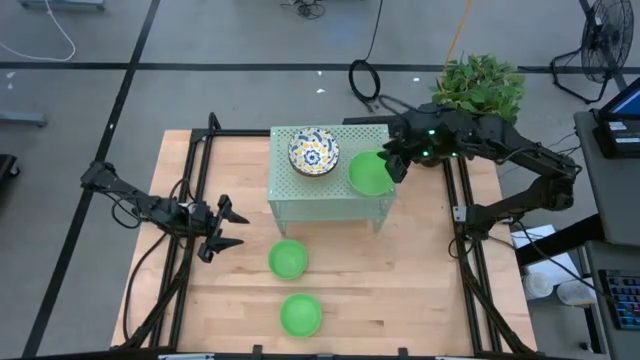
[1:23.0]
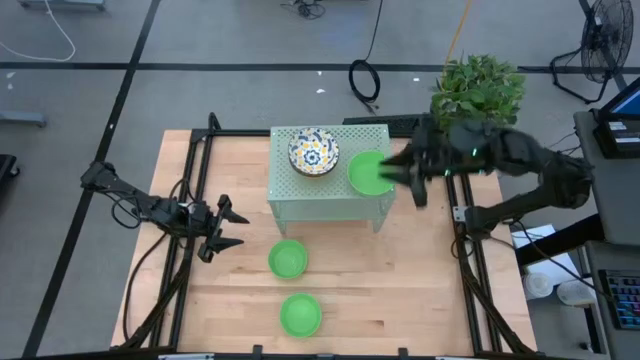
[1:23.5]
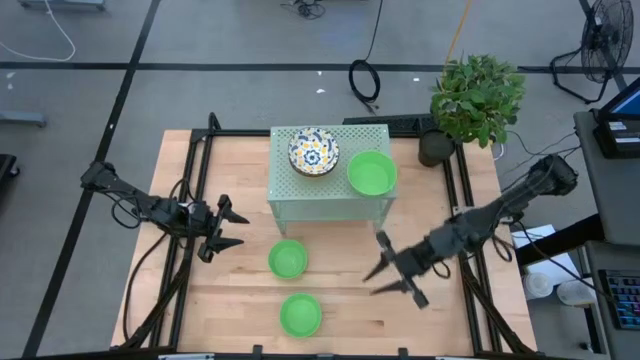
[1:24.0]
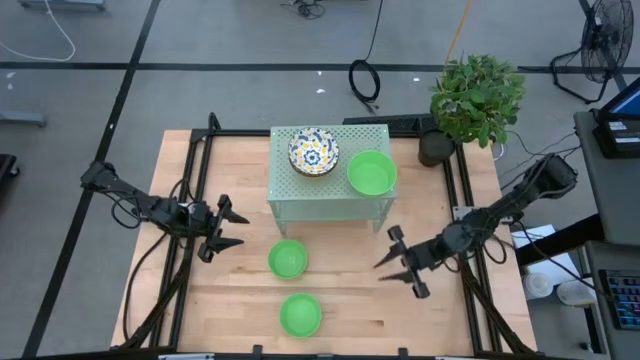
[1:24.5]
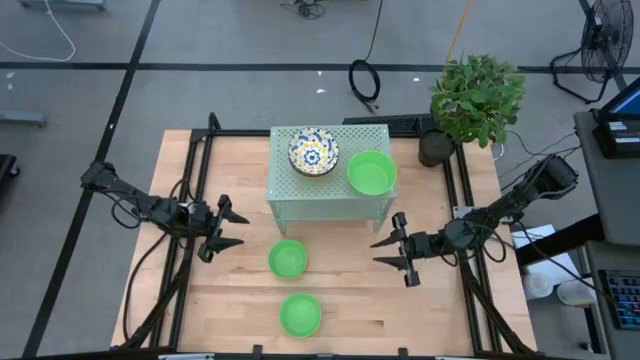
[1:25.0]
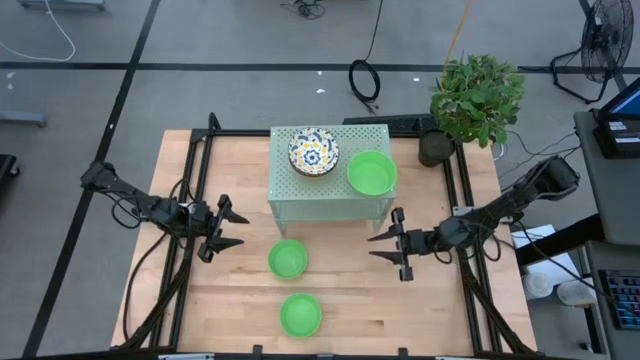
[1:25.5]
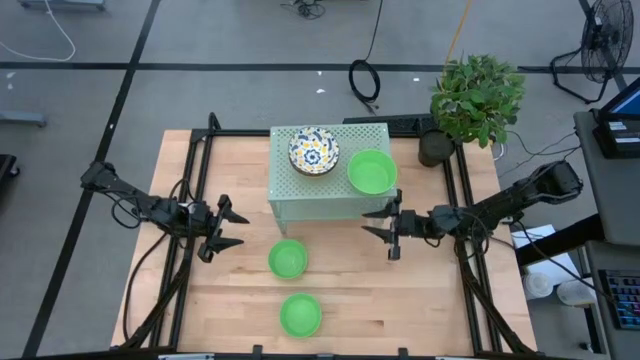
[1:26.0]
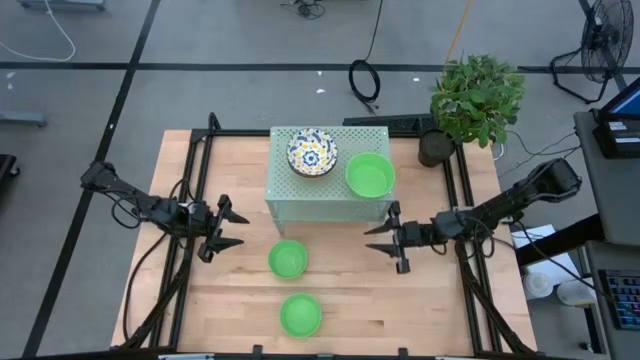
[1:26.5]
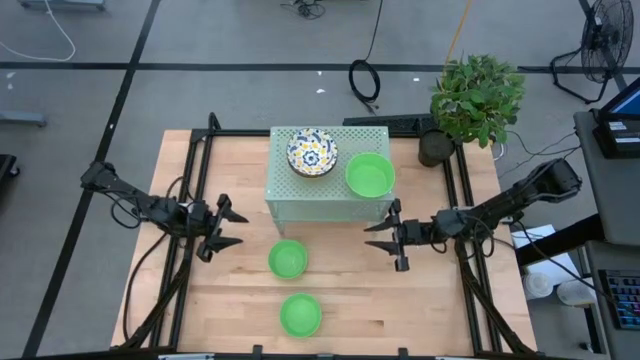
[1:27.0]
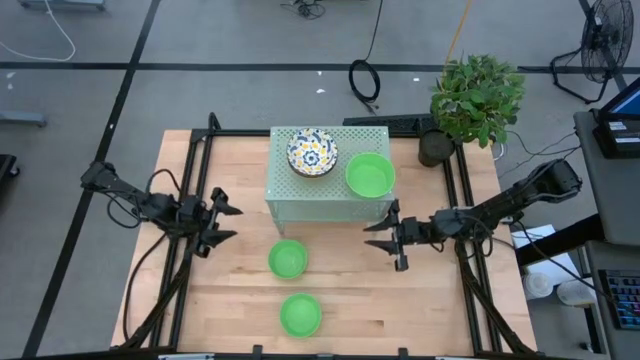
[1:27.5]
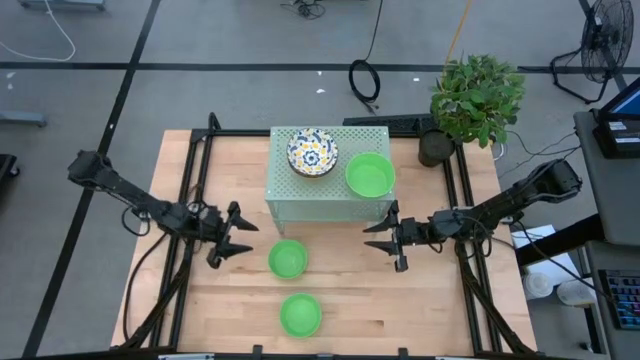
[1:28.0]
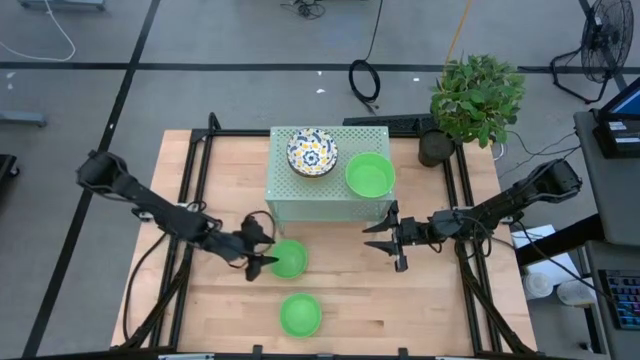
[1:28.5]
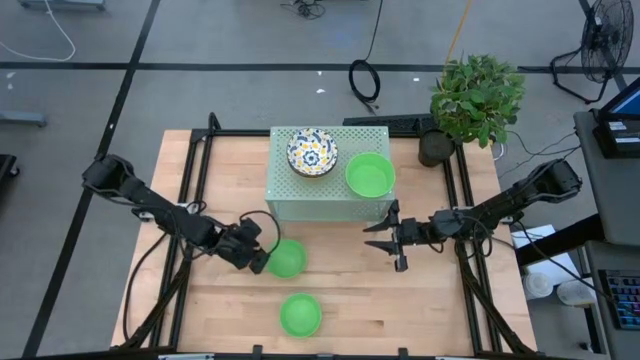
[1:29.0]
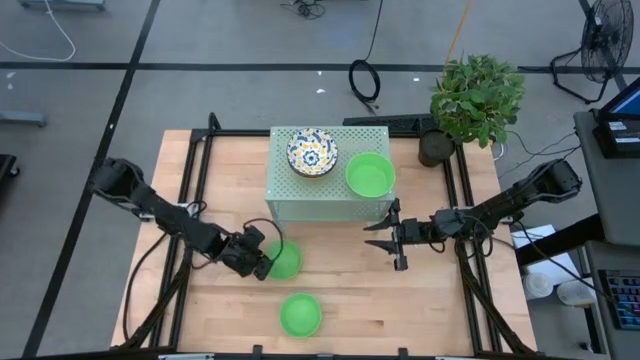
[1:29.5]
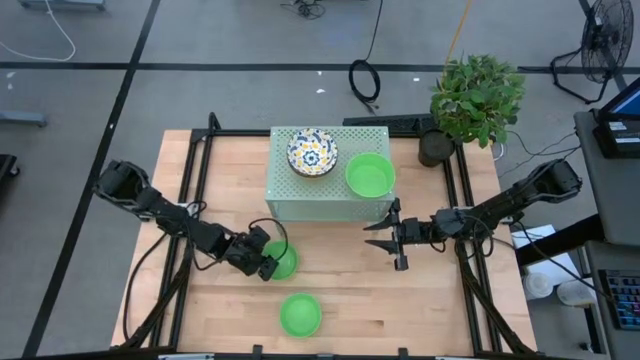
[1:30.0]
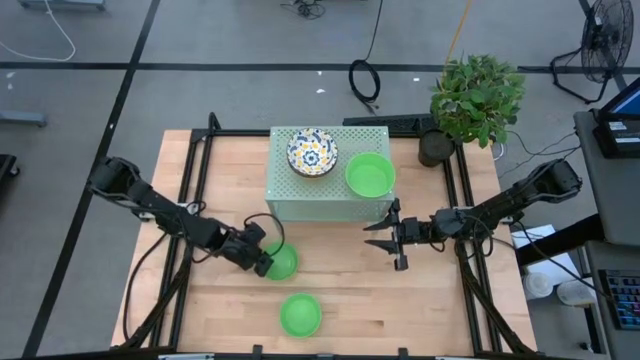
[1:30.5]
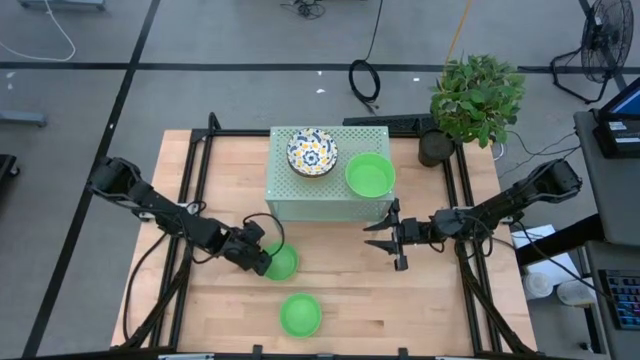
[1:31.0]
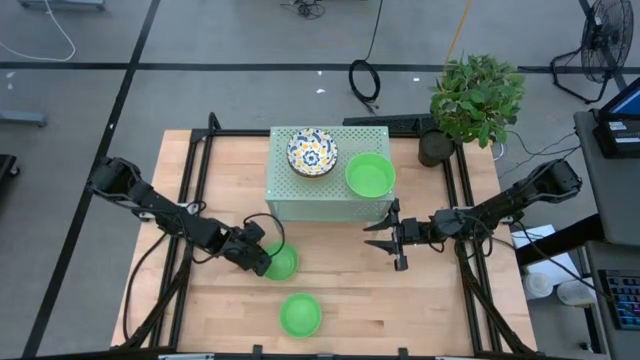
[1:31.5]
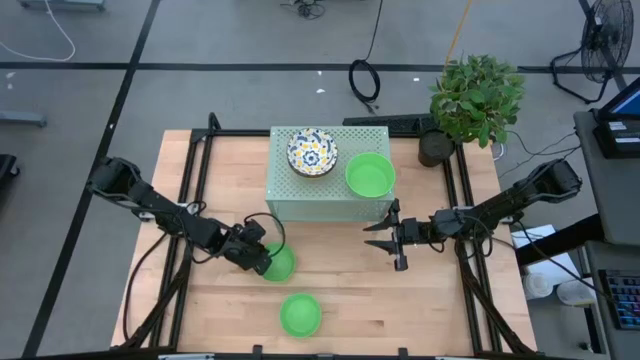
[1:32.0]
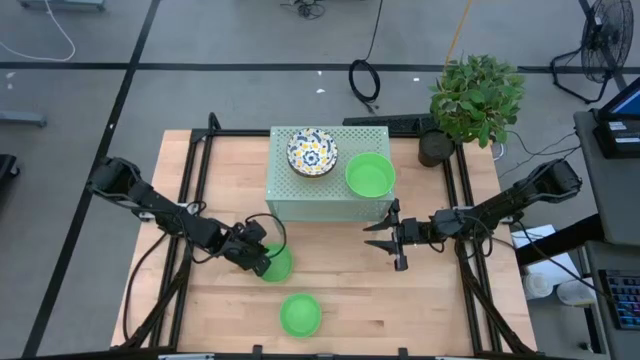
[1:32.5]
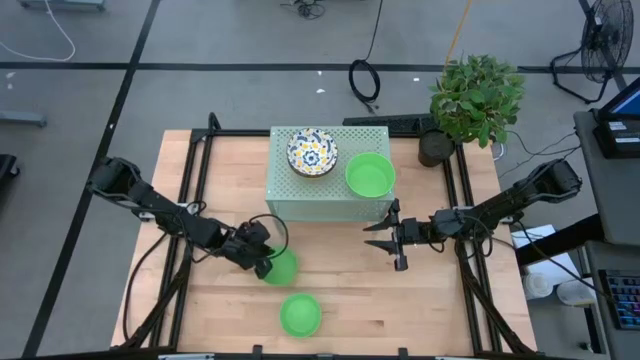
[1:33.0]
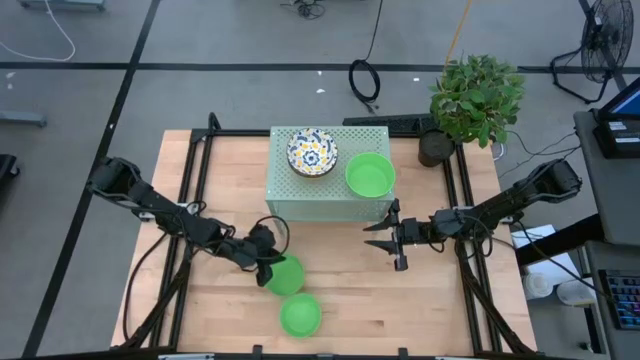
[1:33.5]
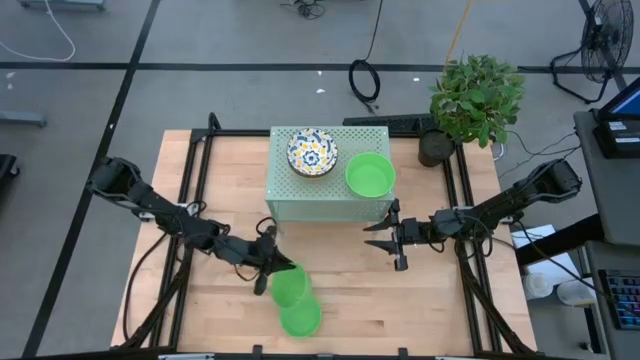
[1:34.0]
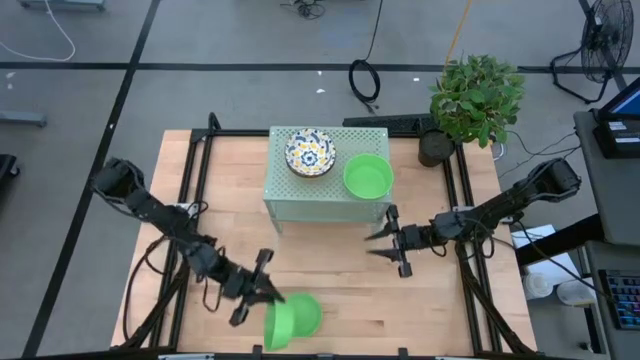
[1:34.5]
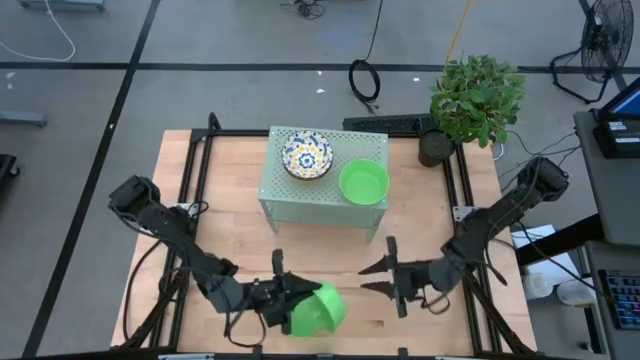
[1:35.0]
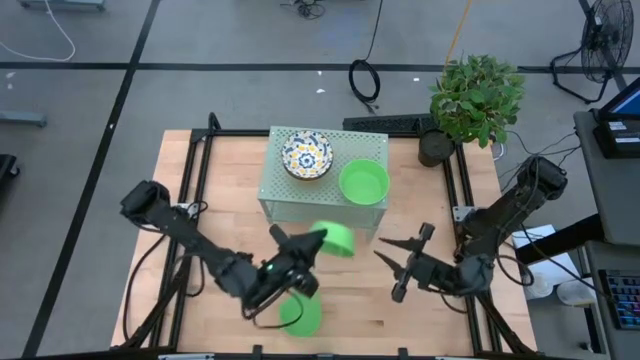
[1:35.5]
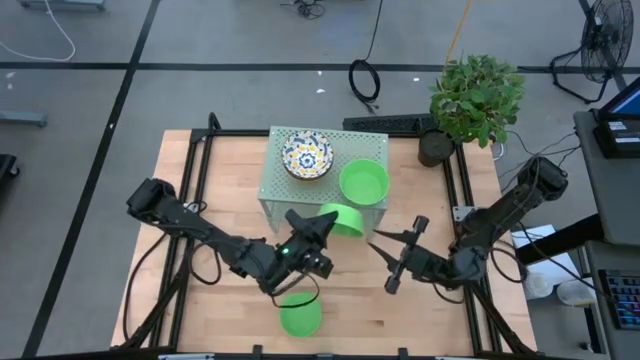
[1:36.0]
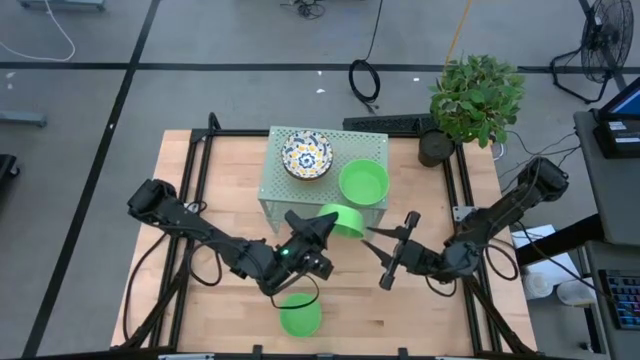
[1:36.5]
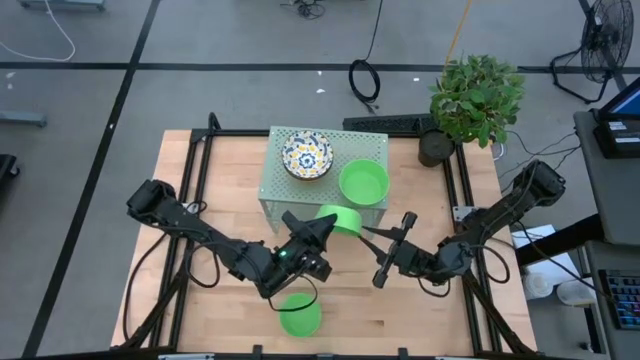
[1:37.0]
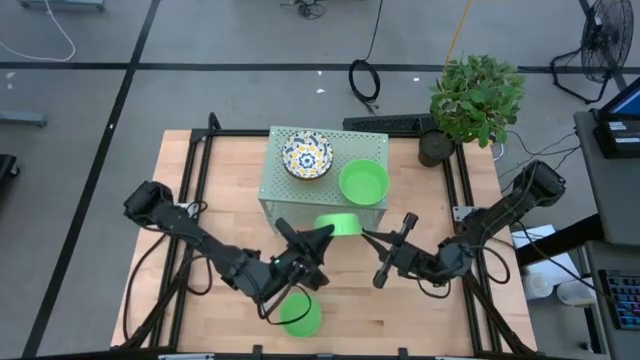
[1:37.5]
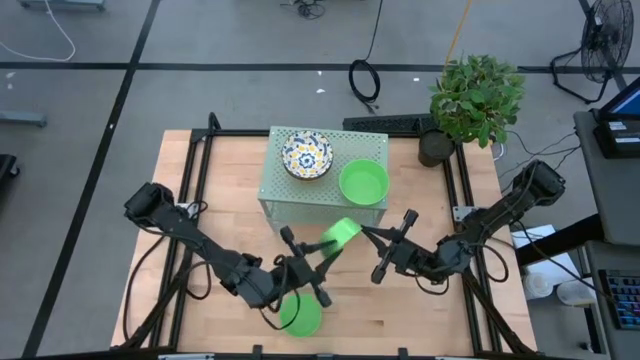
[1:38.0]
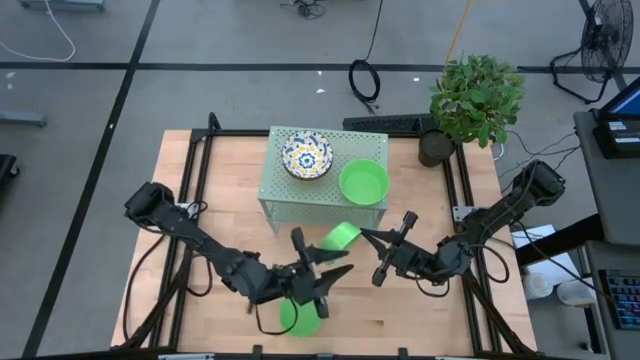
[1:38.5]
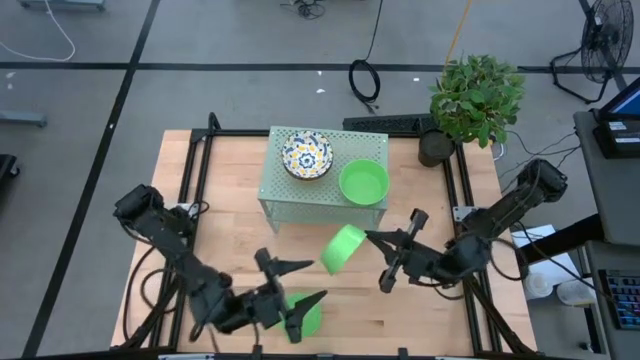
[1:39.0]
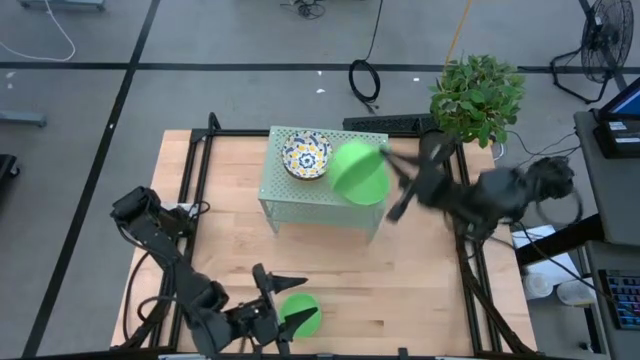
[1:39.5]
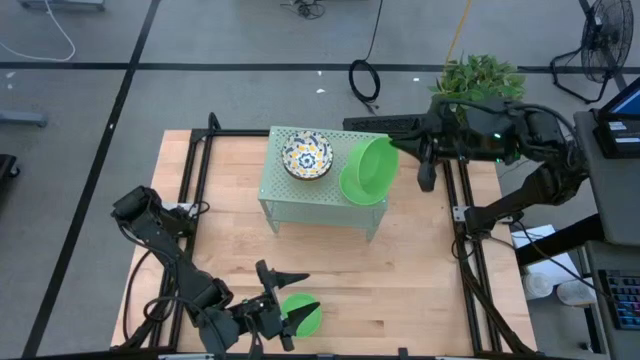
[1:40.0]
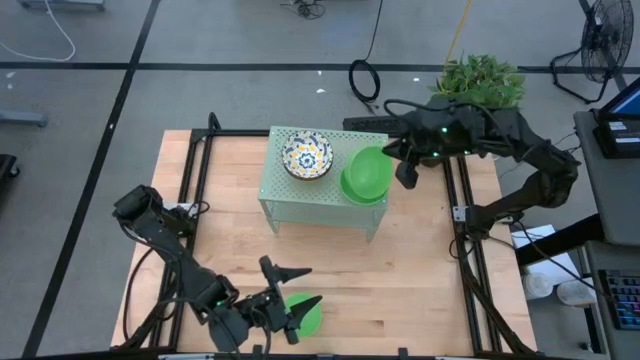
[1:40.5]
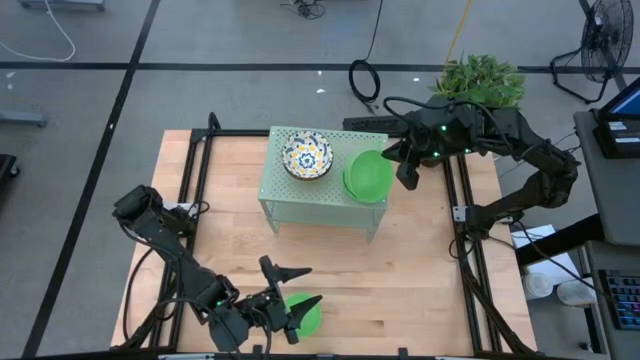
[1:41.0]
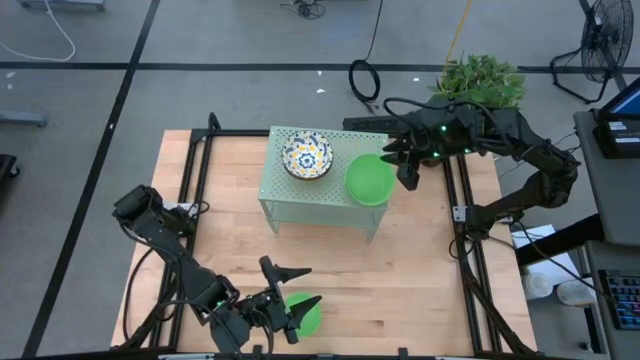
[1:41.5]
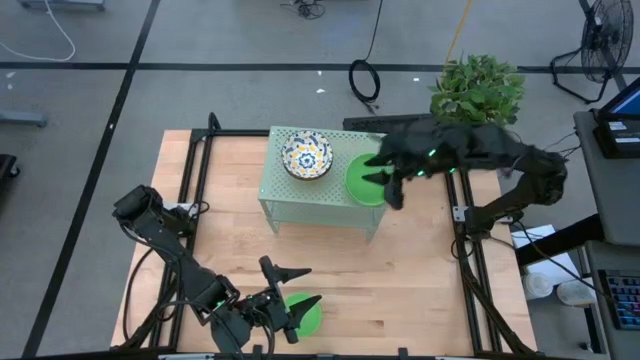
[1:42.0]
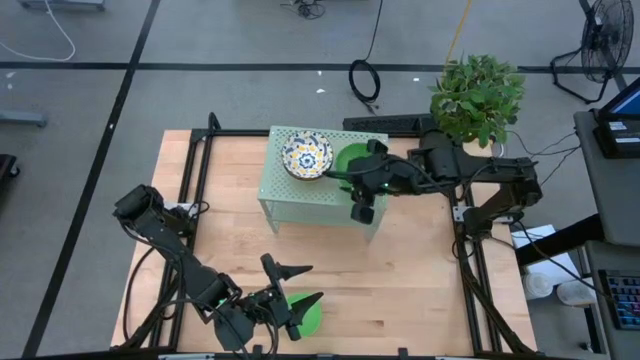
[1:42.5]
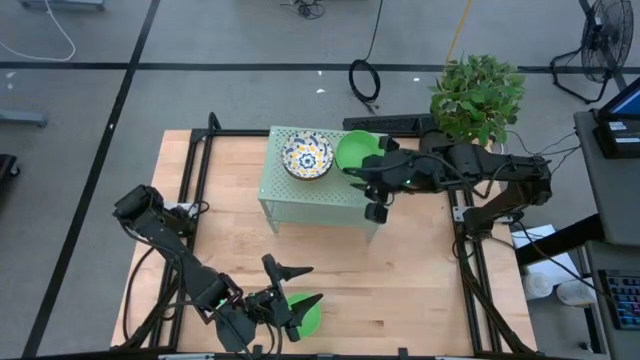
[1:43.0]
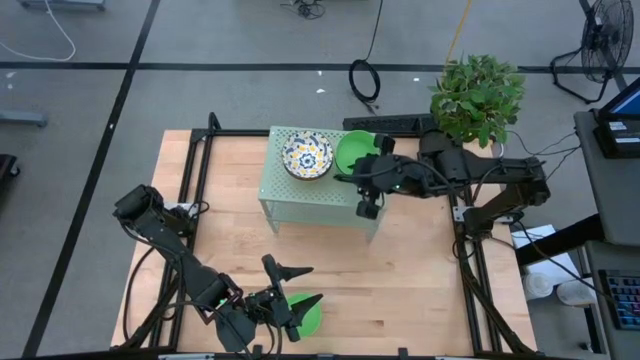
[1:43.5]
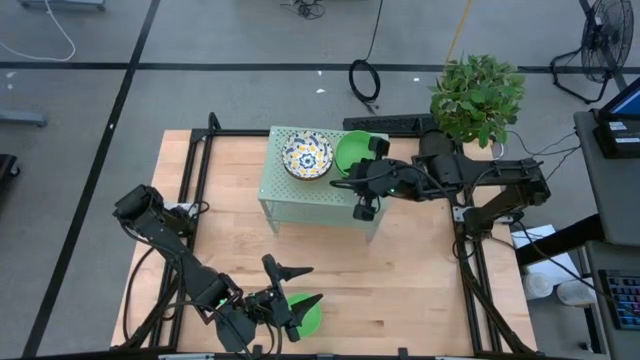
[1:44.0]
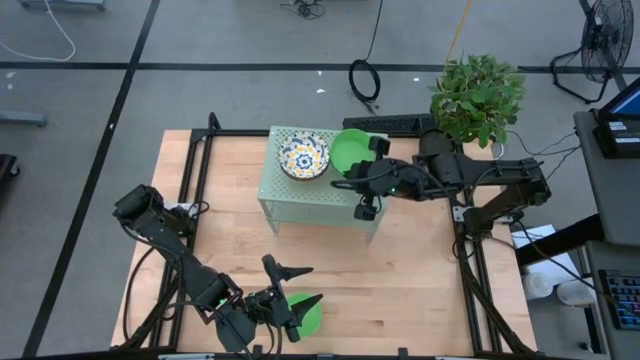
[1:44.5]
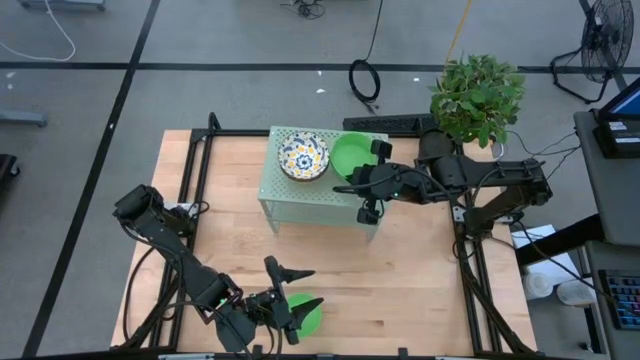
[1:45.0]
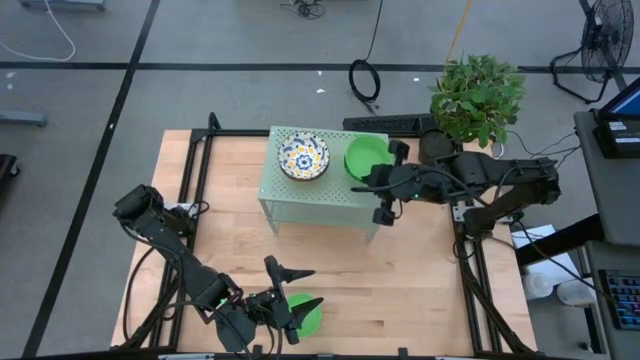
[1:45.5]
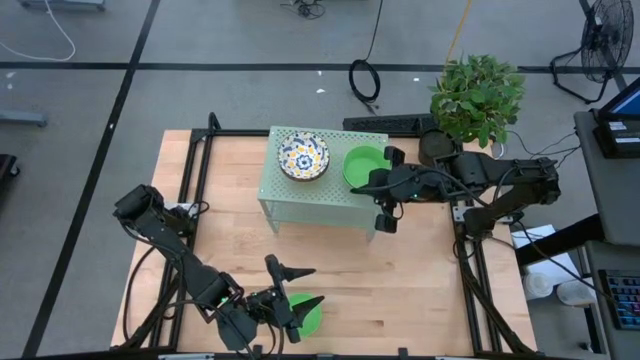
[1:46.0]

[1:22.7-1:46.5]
Task: Pick & Place Mini bowls
Stack the top green bowl on the green bowl on the shelf
